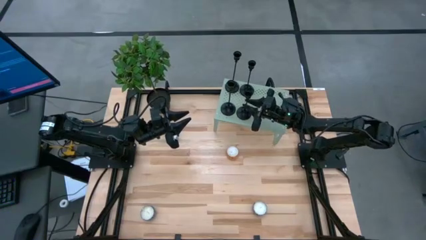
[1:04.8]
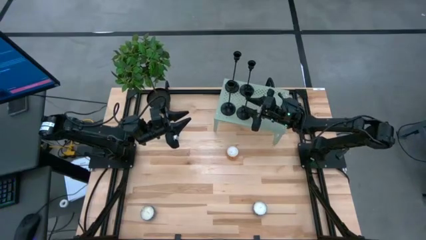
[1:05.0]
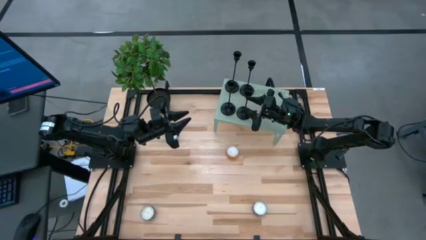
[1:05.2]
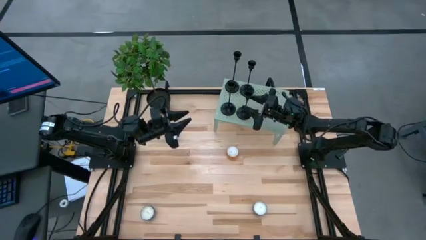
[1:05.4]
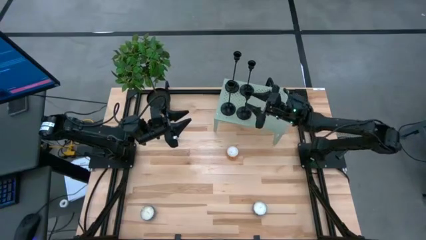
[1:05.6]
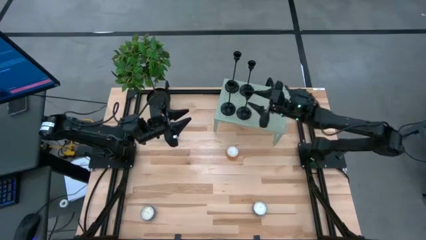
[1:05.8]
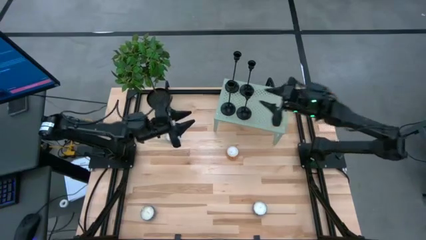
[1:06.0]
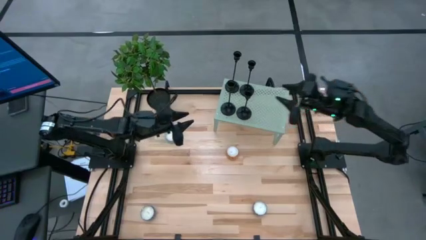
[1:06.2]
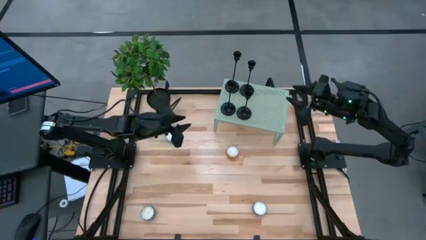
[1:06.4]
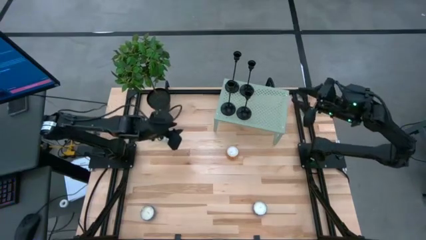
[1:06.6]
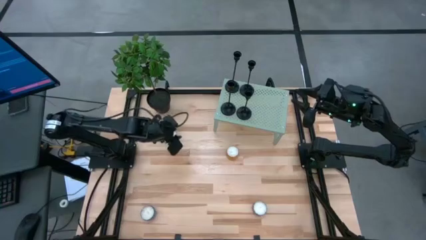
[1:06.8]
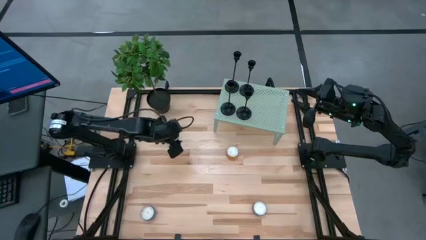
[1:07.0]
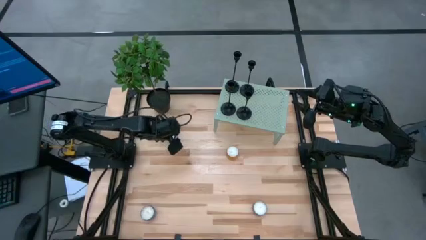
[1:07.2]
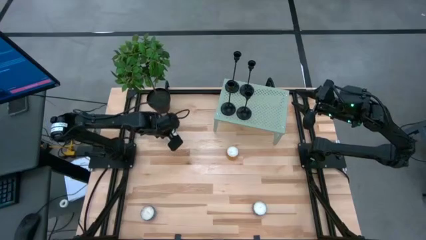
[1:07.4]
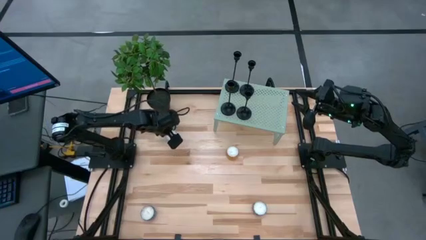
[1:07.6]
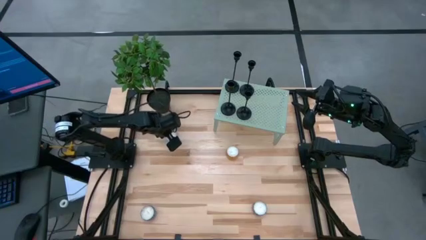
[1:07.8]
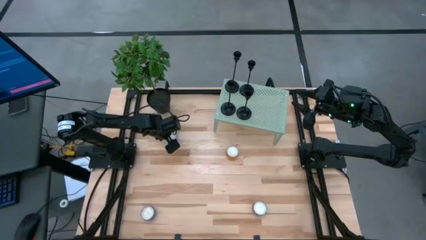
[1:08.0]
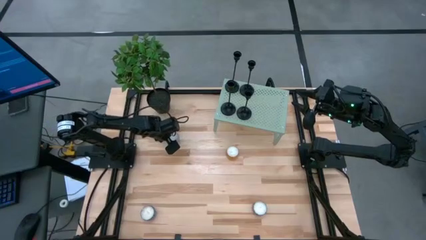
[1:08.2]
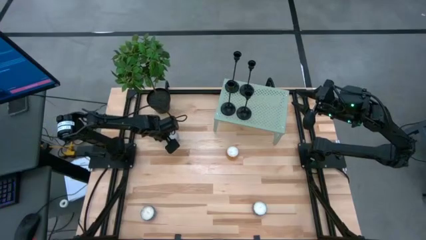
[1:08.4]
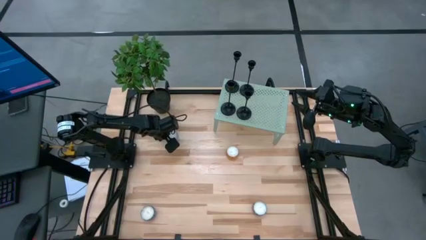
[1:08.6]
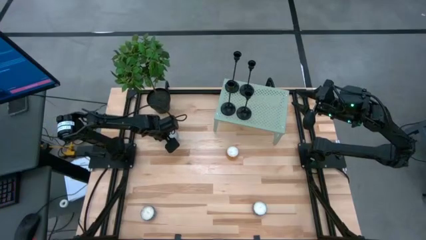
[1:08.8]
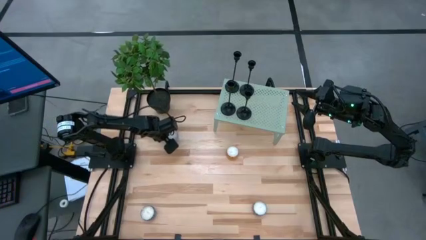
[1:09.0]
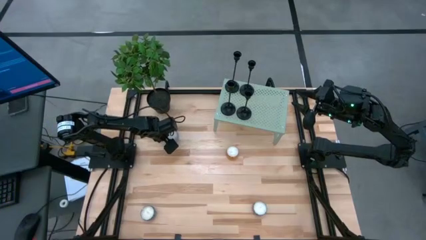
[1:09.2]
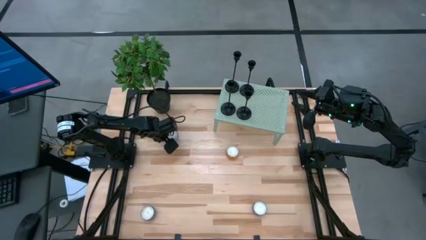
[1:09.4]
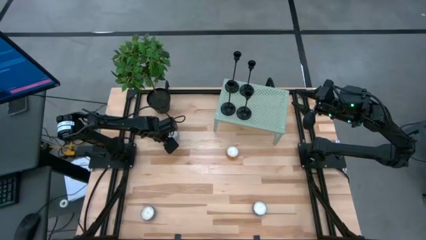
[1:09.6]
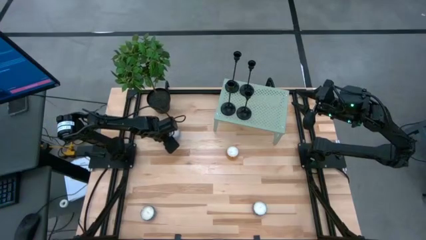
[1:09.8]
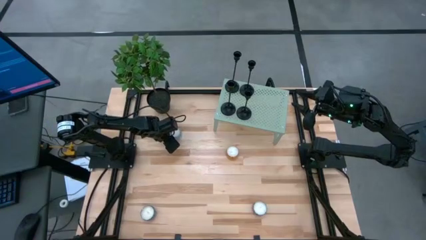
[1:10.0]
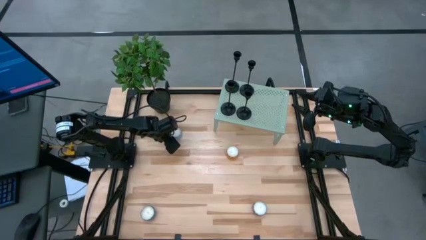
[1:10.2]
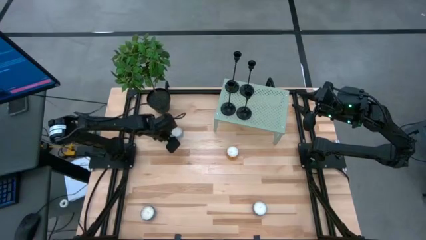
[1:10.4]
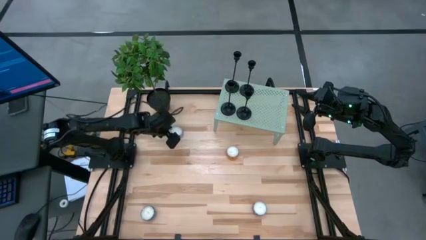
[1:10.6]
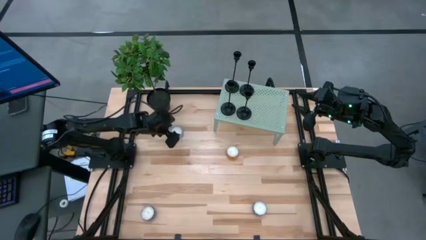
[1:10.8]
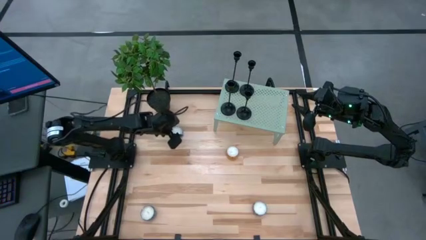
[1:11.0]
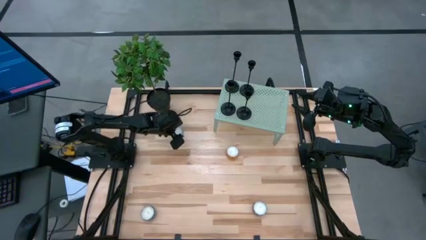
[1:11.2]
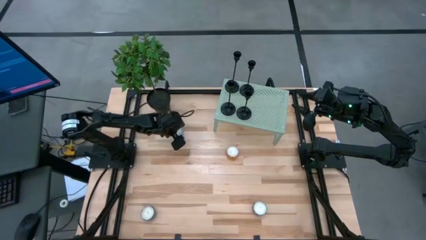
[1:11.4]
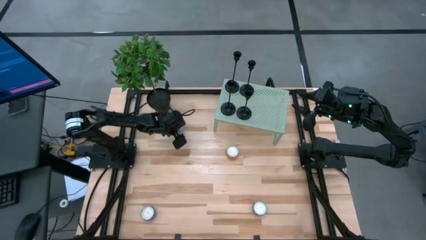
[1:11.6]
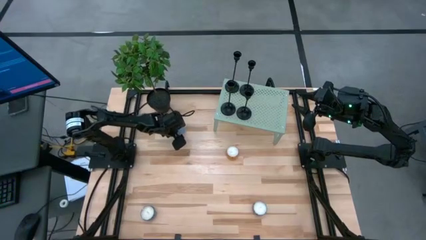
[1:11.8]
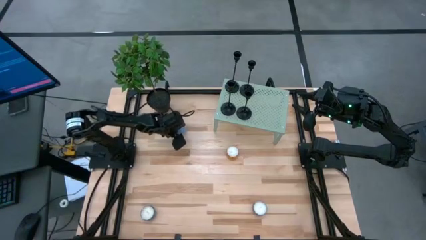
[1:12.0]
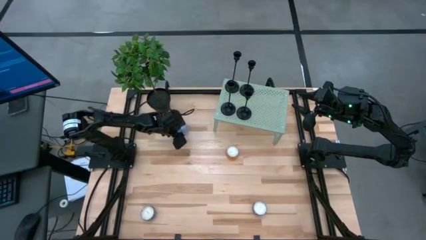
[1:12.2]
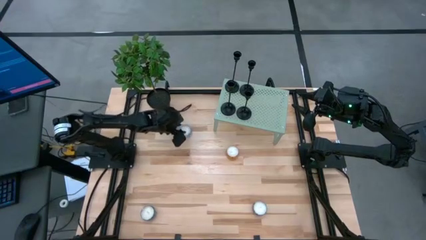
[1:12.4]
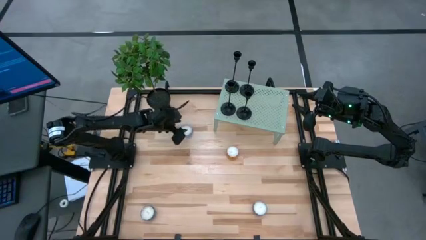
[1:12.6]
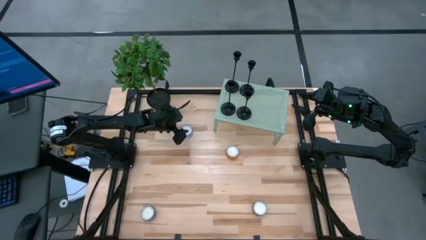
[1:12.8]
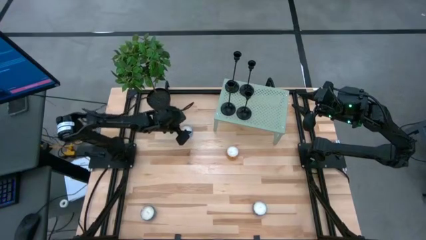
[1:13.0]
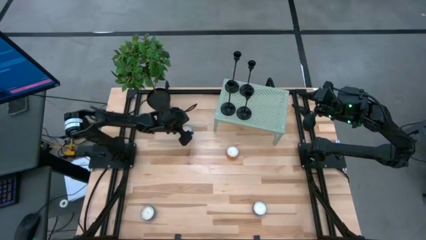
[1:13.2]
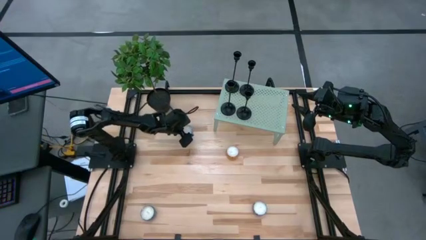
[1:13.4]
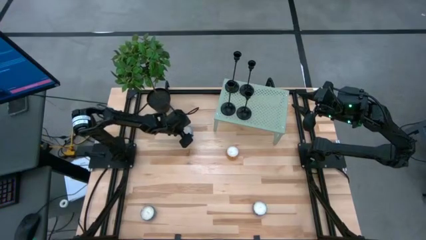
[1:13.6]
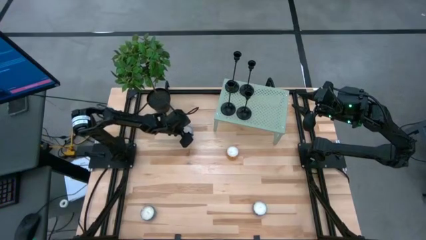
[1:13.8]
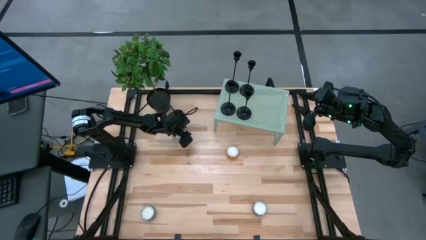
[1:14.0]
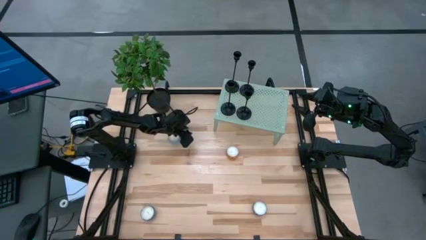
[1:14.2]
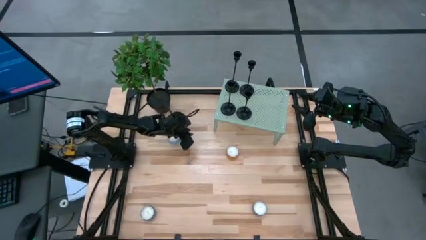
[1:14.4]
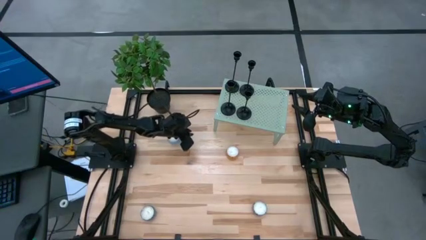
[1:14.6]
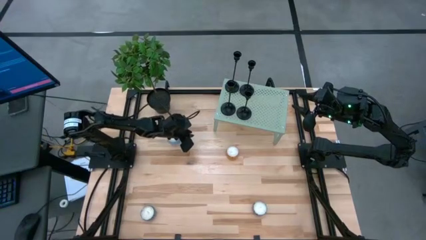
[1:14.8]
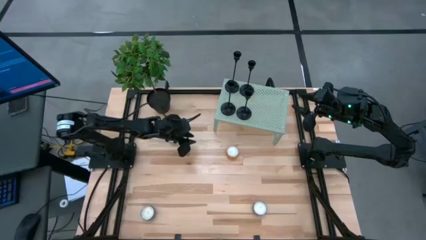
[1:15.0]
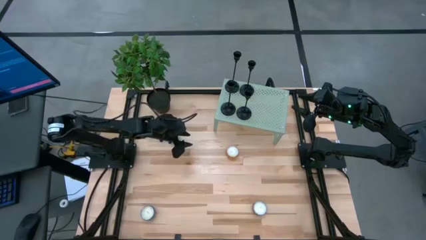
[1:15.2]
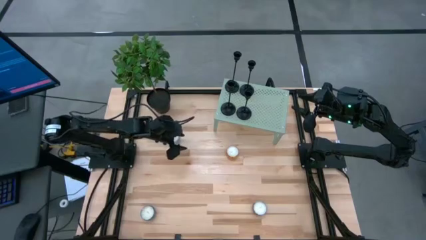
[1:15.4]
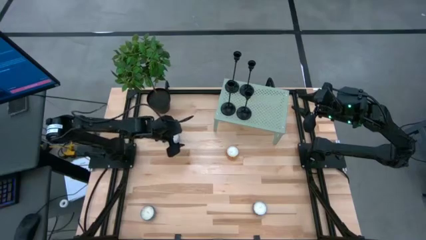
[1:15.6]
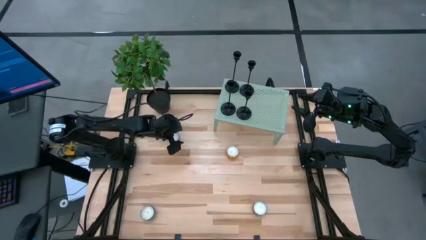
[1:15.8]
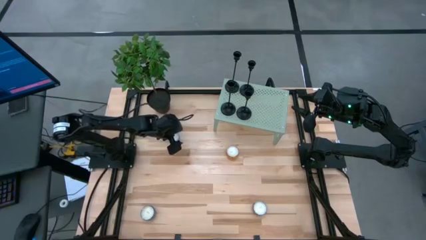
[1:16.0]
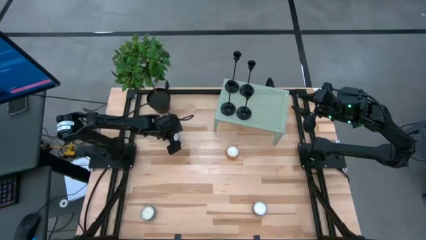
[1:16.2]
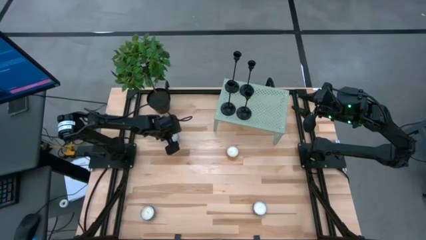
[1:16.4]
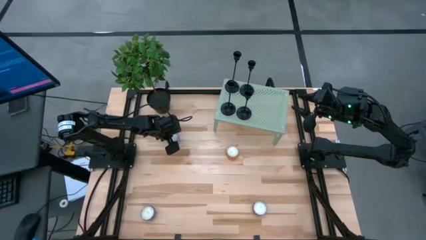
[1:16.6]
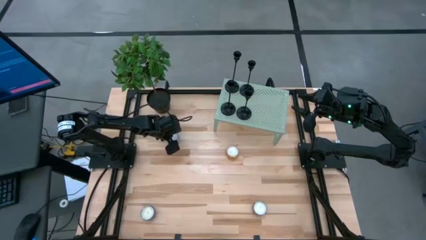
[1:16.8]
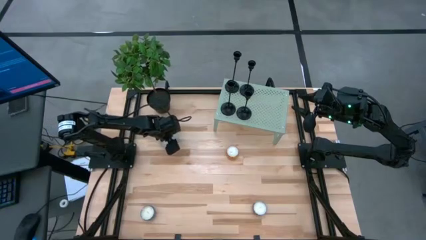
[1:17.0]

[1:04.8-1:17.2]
Task: Pick & Place candle stick holders
Move the blue scented candle to the center of the table

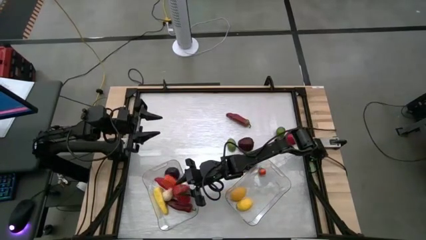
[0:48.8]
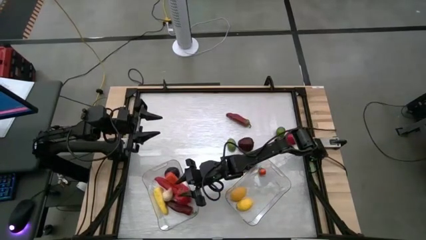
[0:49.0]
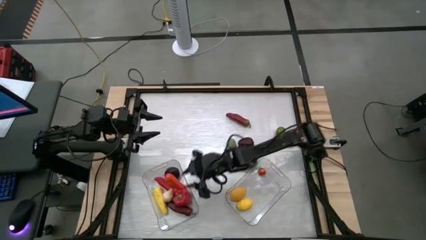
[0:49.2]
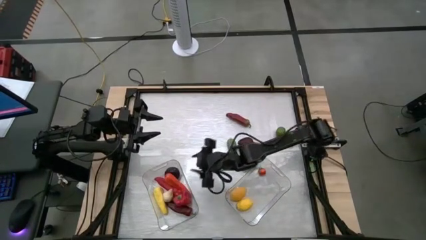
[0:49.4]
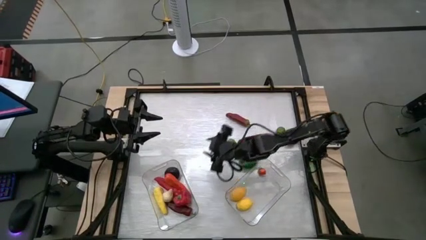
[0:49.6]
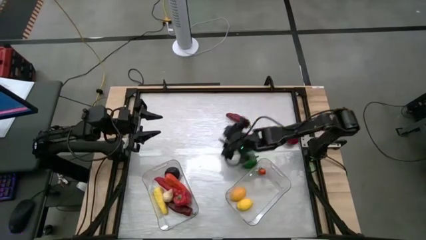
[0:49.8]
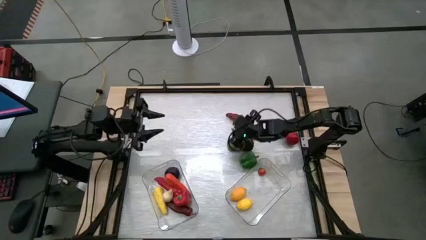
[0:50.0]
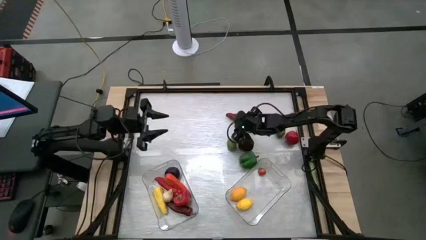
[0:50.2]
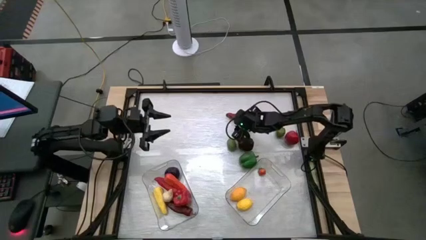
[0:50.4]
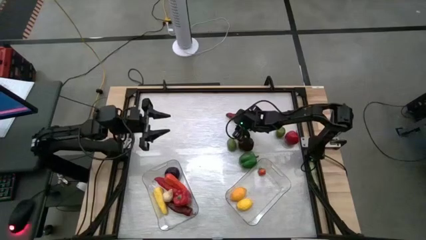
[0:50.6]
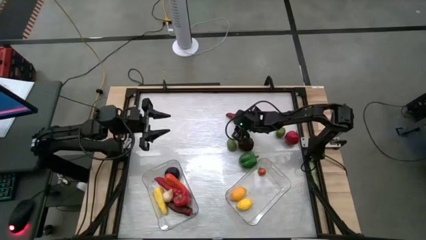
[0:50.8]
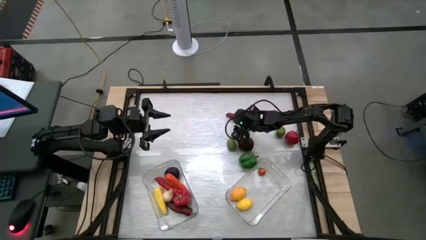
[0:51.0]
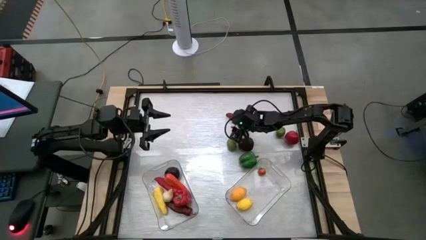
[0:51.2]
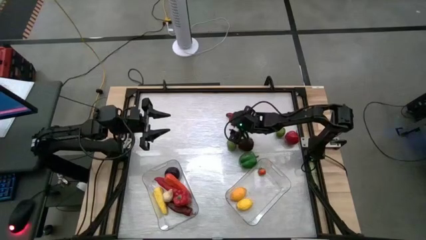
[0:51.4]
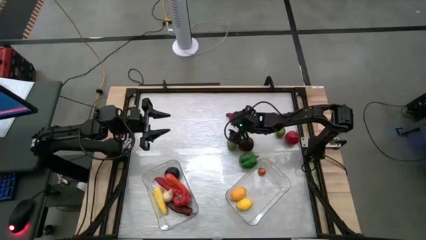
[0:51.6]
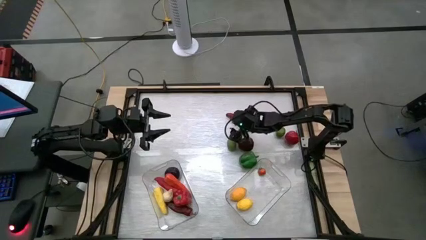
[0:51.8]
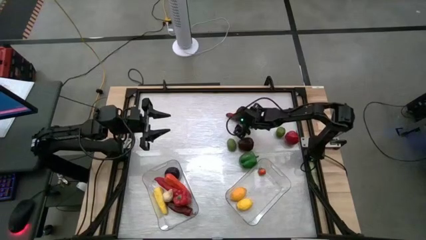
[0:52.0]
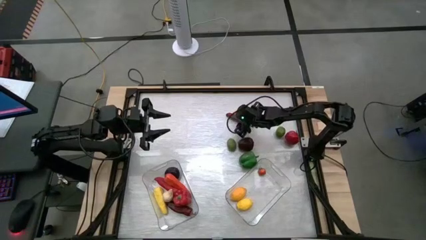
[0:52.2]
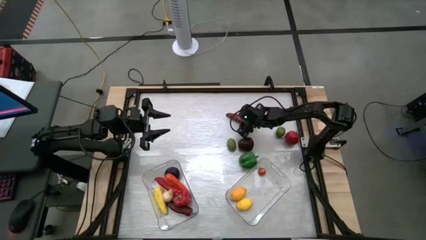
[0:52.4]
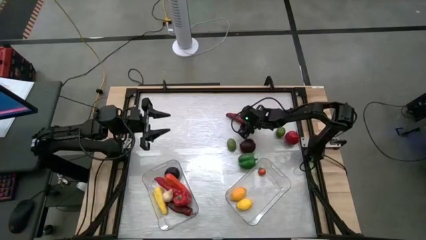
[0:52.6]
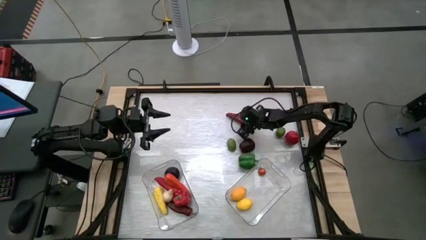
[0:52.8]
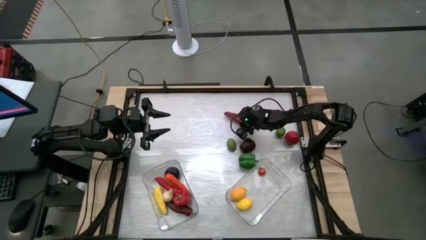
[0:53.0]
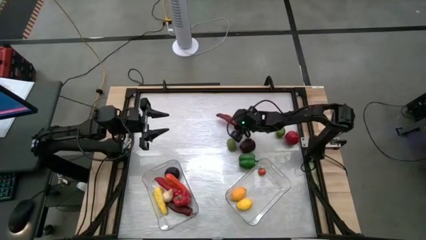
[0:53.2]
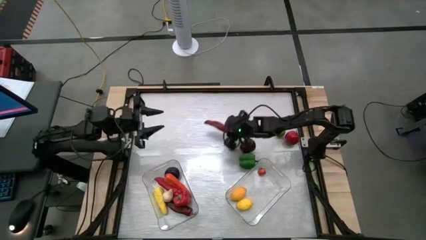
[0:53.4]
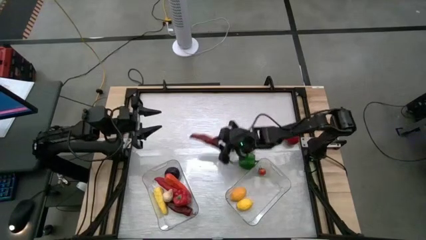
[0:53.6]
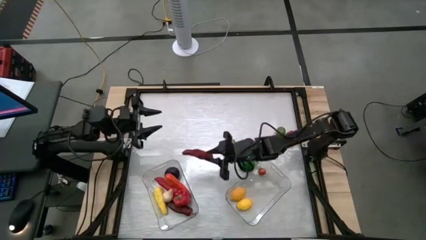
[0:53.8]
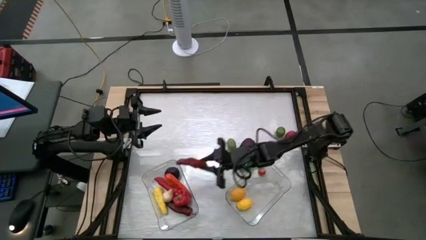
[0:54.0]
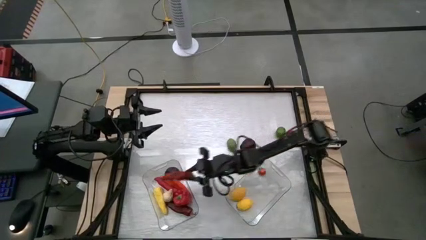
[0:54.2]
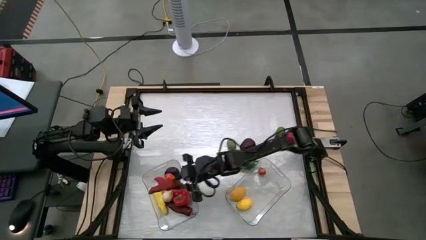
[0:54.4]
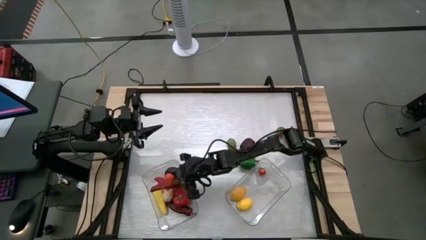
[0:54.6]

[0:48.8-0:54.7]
Task: Sort produce into baskets
Put the red pepper into the left transparent bin
